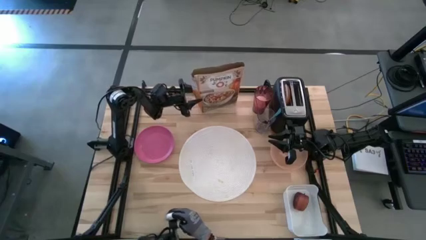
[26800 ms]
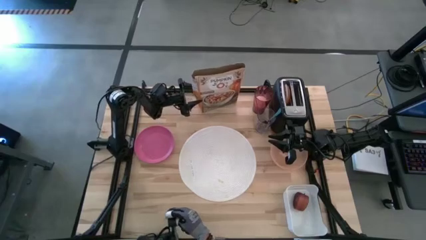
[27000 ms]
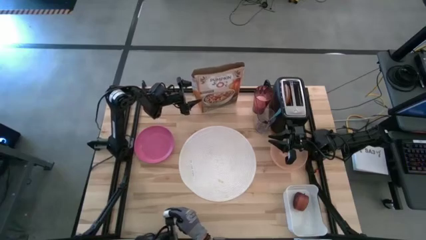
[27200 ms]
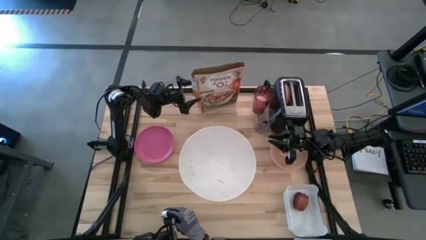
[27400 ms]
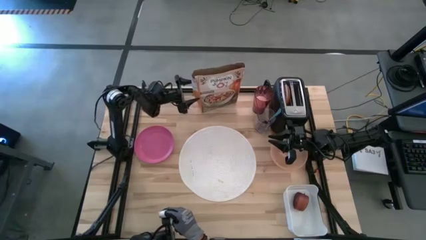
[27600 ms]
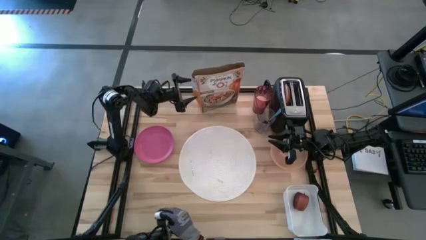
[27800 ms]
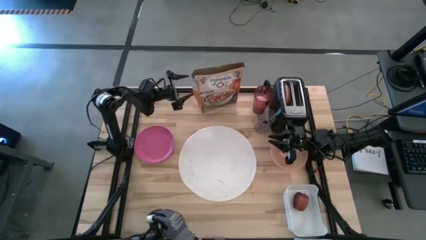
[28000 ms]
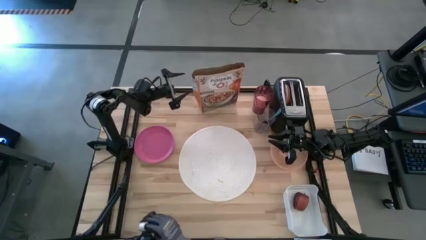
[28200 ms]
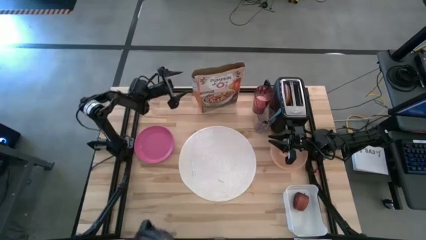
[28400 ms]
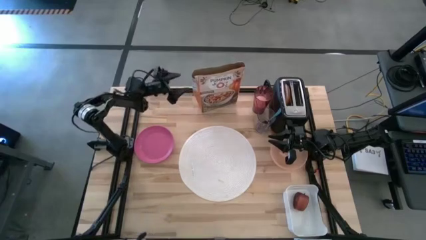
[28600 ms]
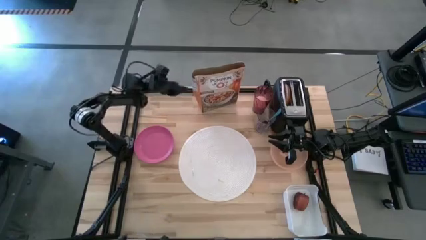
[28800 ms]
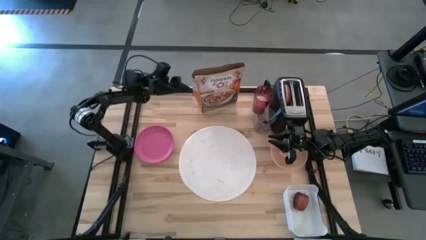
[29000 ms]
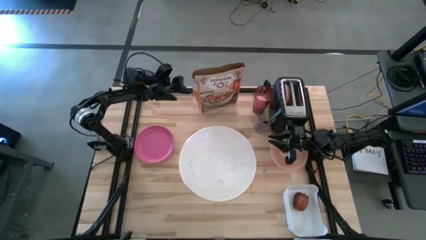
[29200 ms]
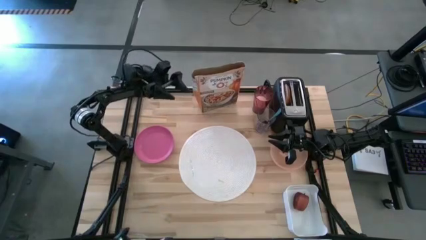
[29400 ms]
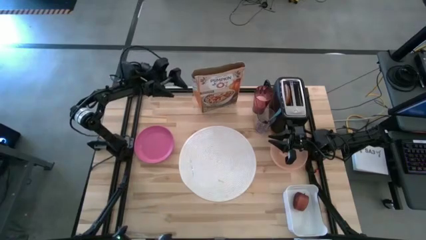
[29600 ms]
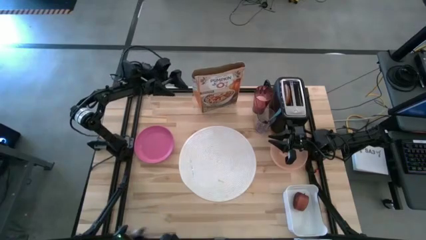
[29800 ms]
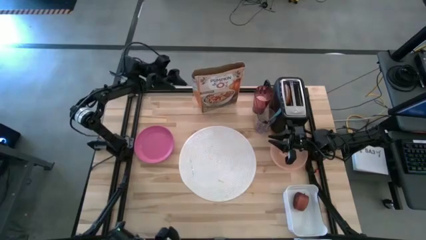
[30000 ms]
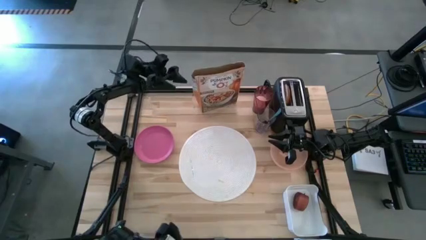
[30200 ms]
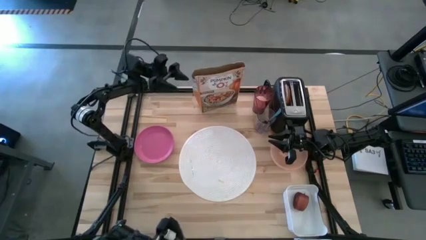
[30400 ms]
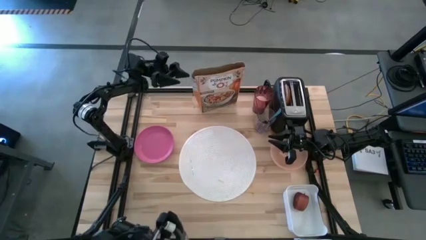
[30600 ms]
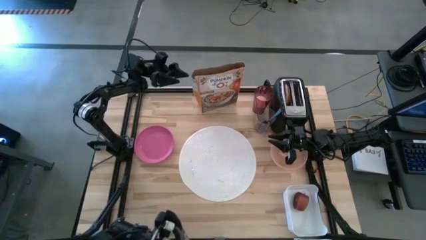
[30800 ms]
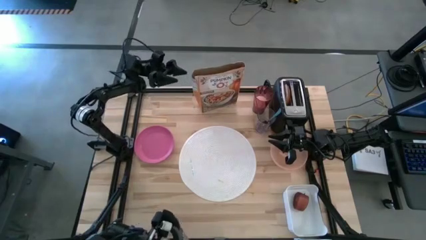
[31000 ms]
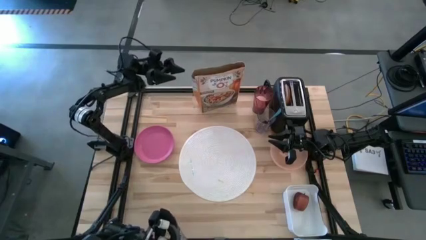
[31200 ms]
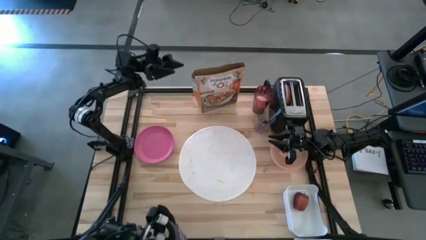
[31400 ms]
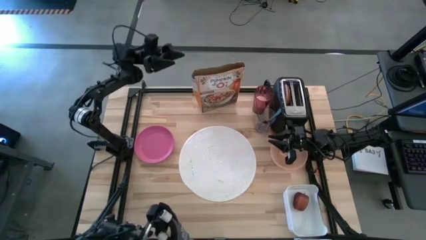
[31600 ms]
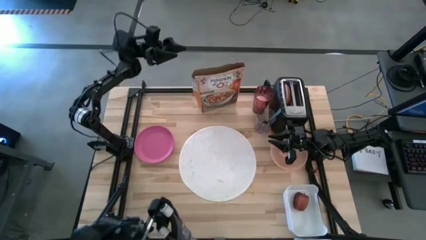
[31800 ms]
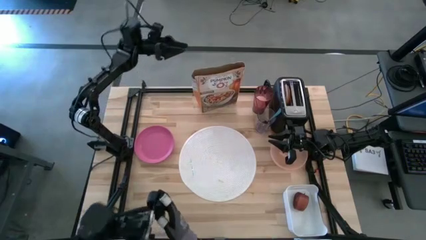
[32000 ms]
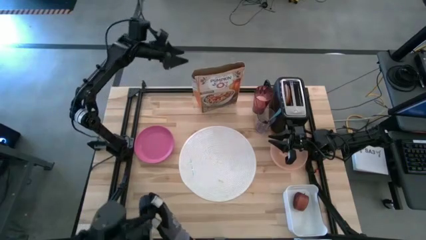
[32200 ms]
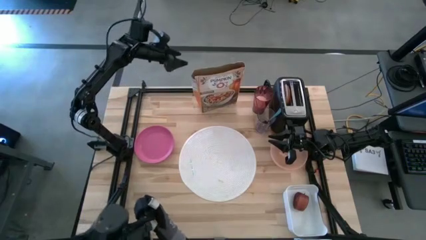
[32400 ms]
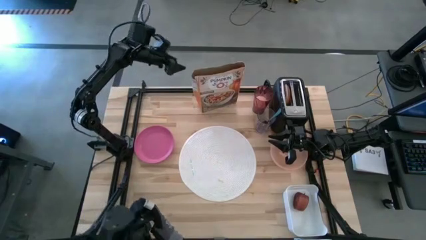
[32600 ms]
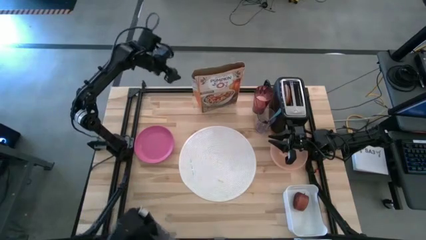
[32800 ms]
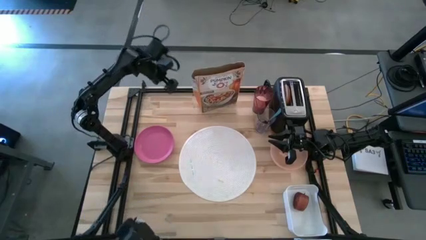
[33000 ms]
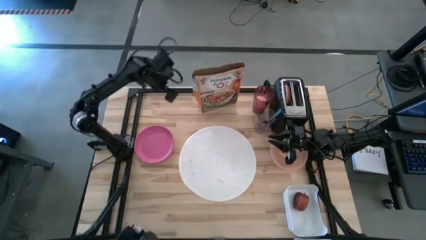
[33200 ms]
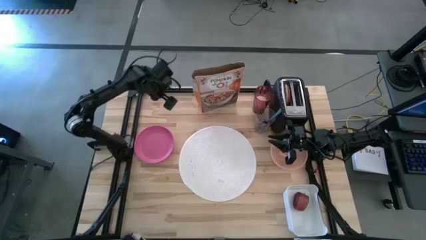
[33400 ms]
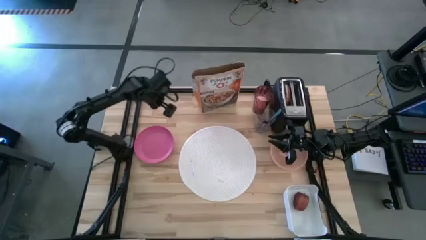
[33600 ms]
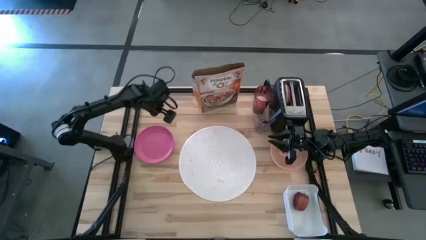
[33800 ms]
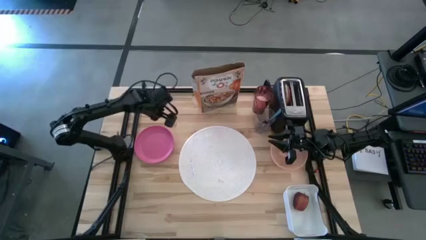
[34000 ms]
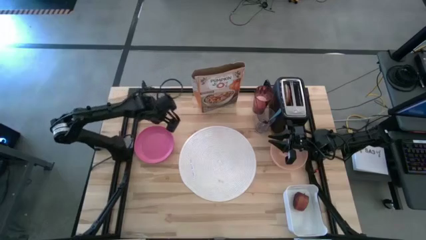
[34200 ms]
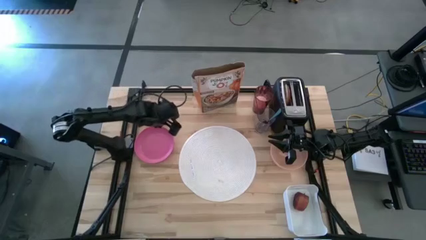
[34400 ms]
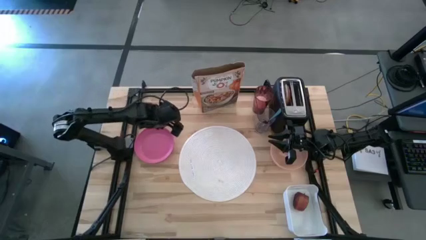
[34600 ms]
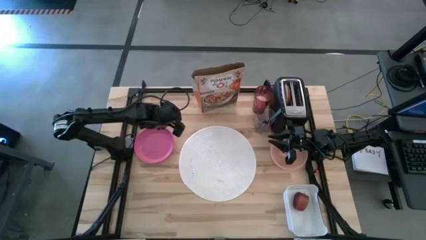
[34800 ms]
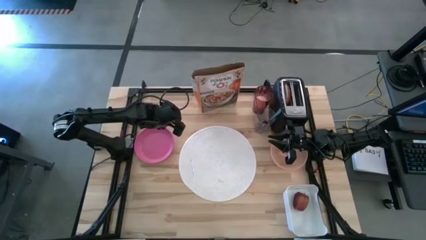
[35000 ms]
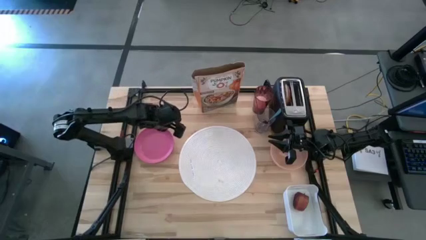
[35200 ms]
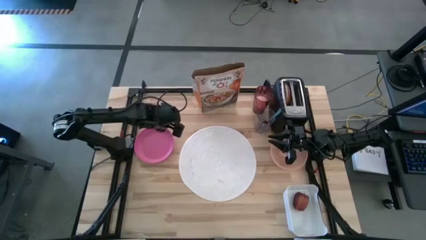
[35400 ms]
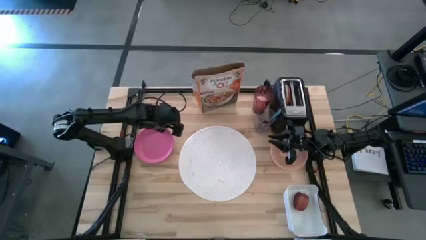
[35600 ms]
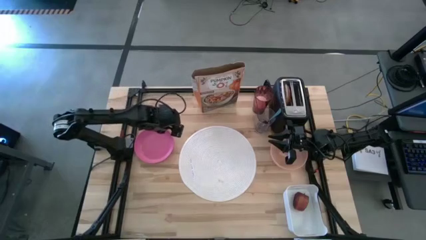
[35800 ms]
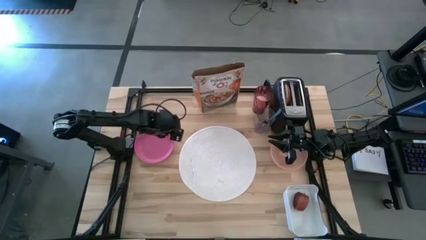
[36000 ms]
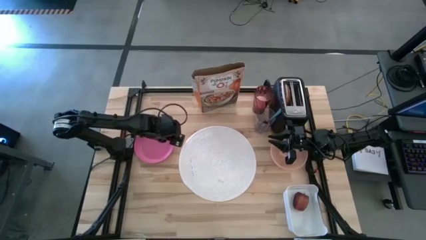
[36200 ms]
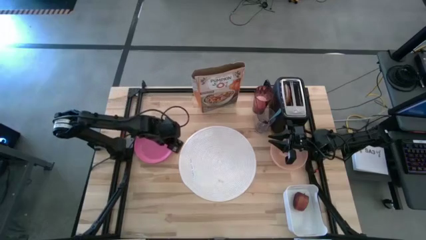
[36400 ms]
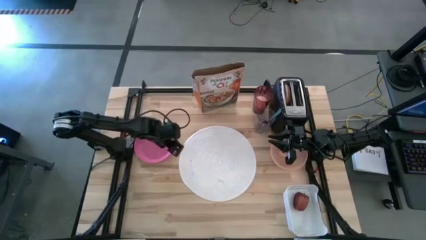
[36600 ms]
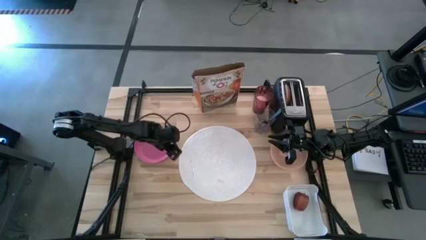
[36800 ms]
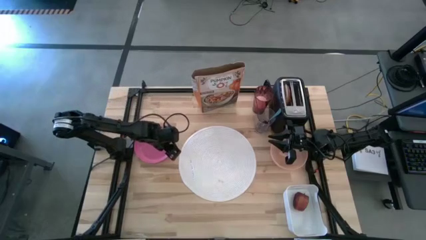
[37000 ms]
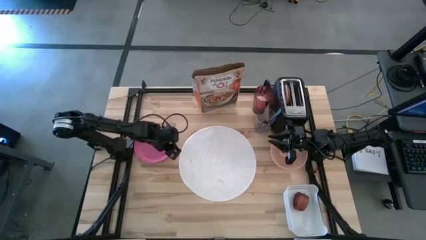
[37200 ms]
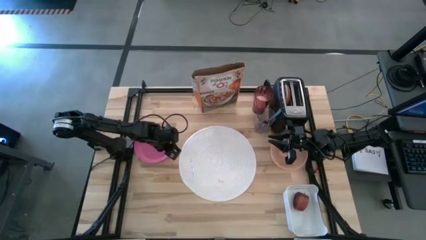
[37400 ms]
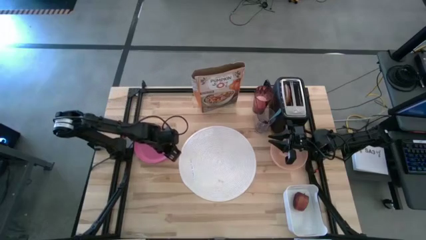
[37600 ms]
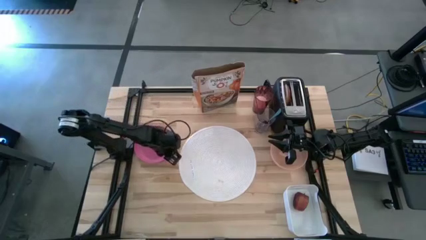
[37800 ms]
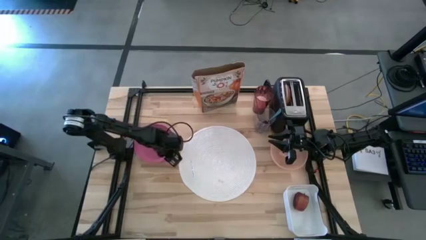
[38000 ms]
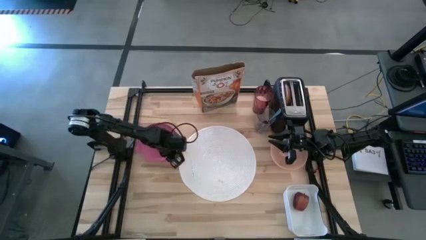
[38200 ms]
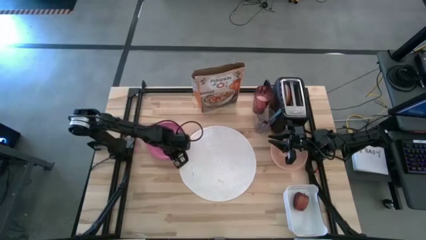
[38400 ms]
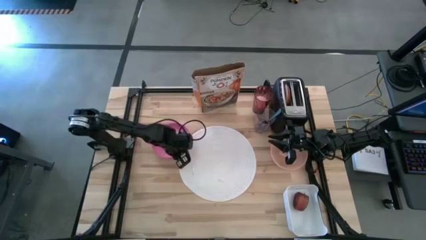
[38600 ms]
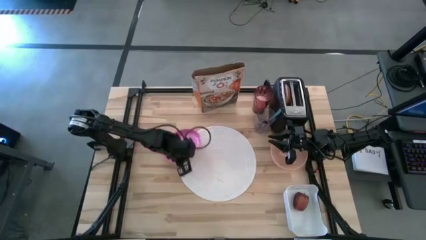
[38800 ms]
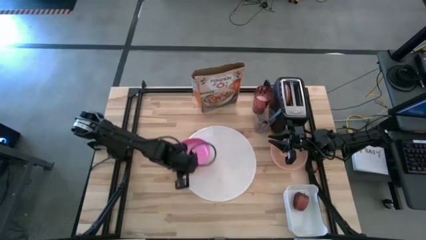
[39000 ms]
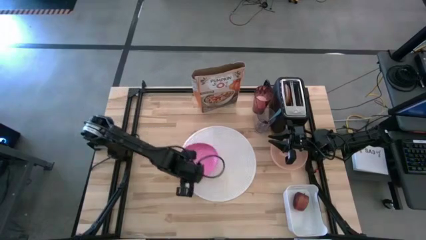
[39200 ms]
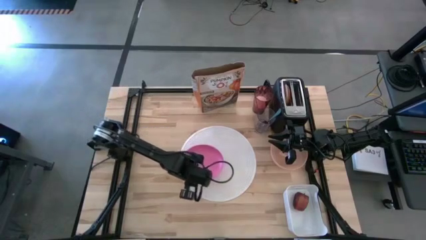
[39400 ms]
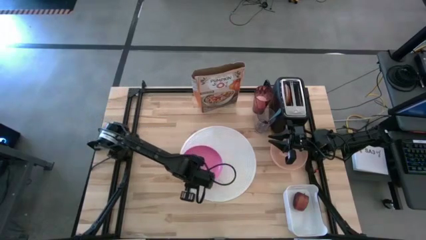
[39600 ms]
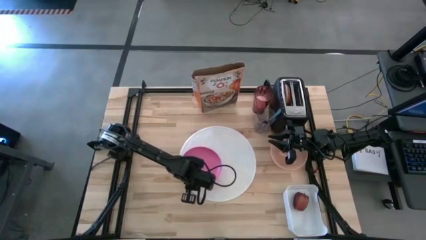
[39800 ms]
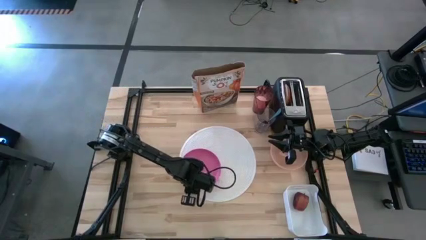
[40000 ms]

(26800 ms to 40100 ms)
Task: Arrange a breakfast setting
Put the pink plate on the white tablemat
